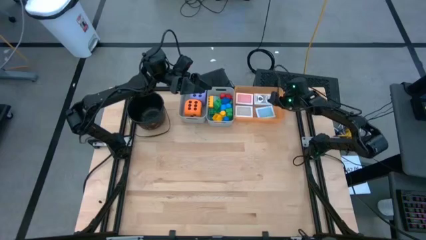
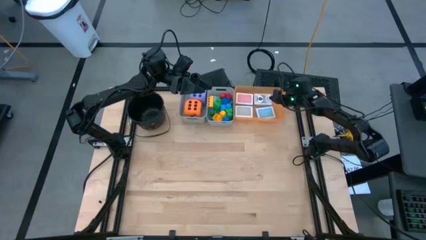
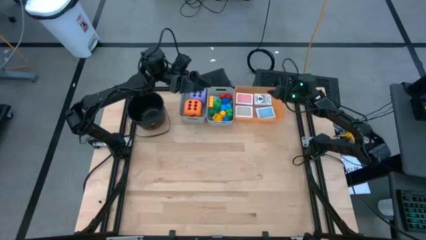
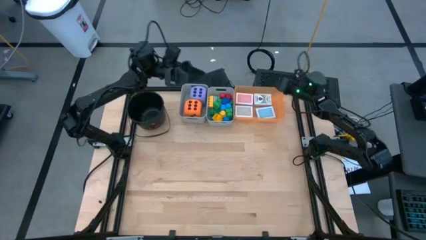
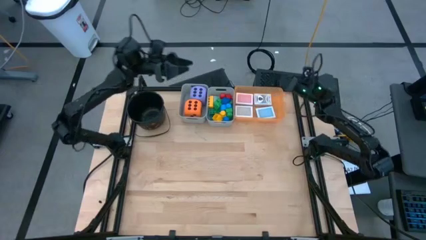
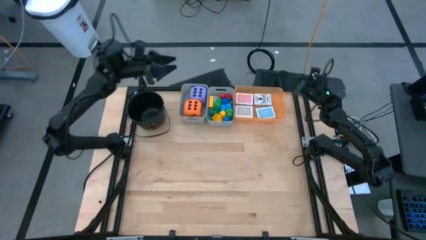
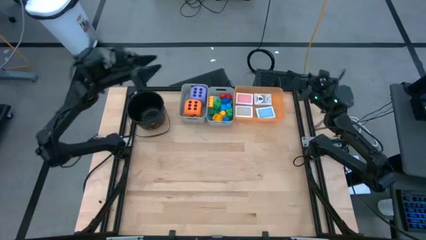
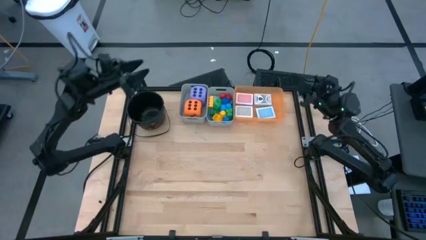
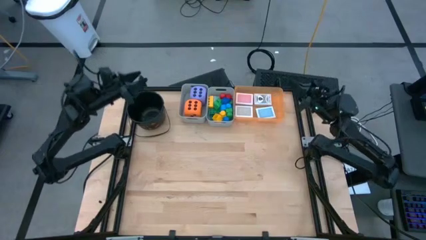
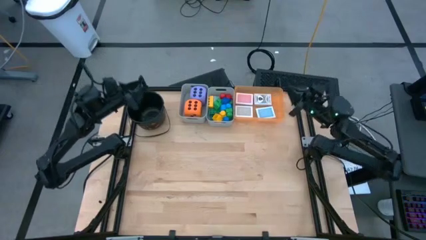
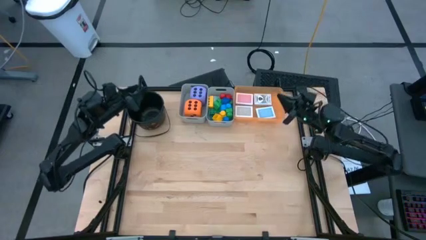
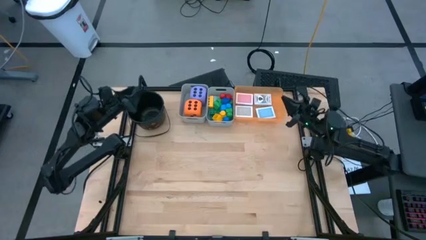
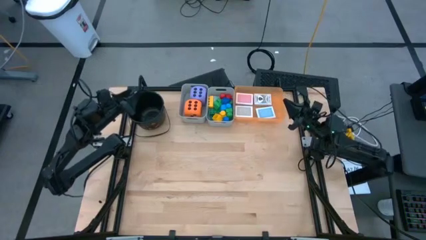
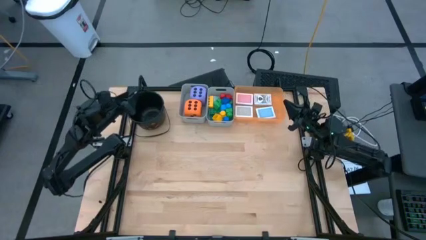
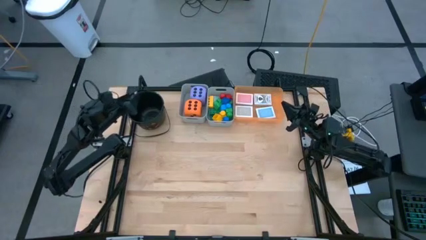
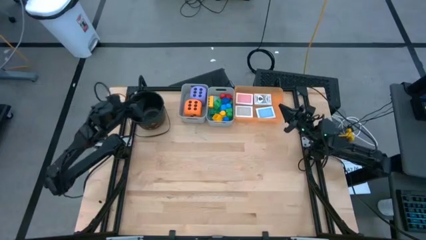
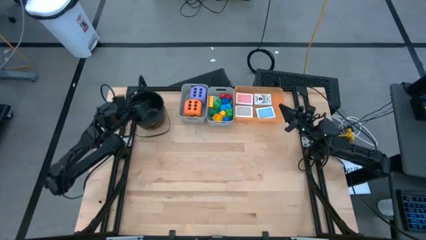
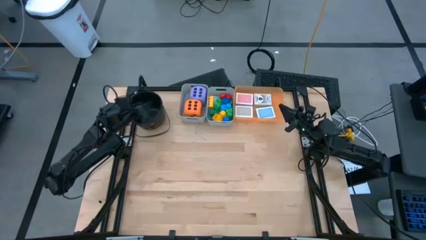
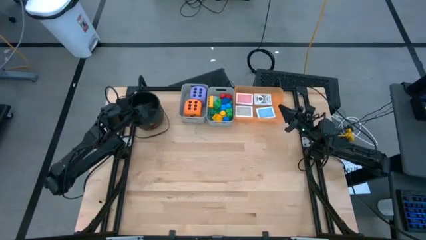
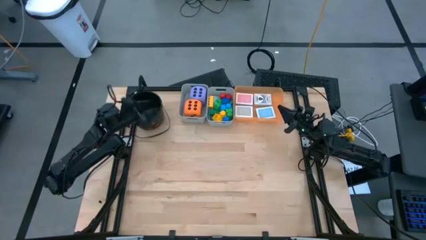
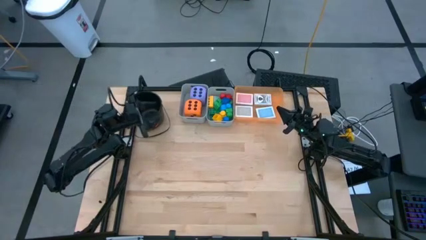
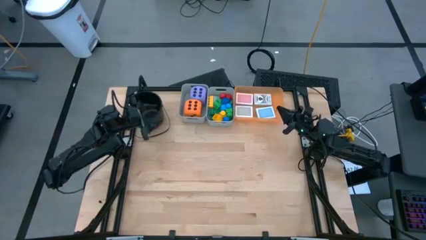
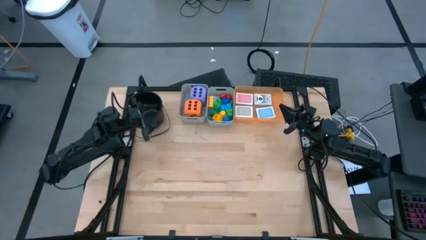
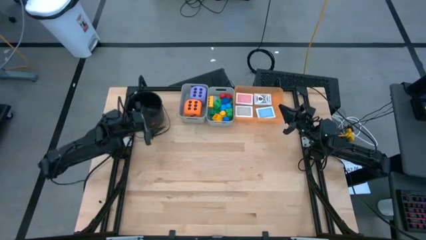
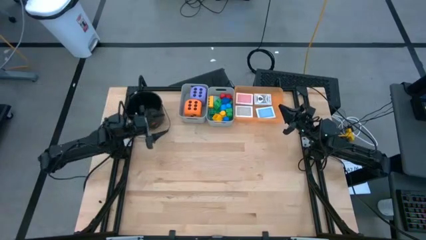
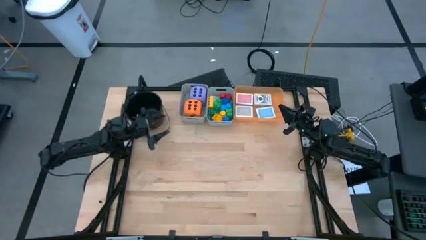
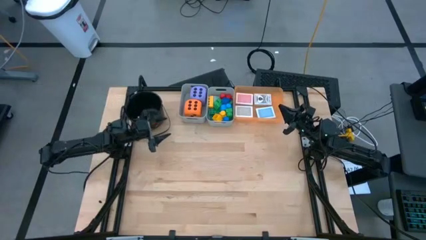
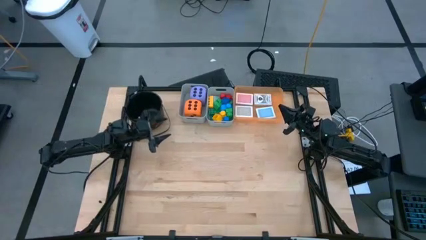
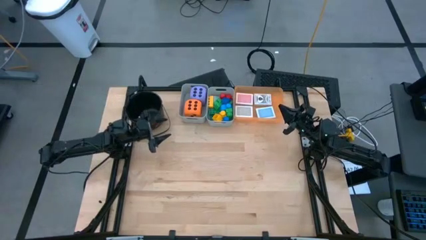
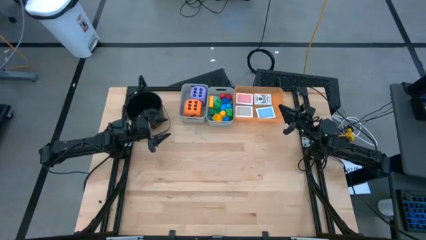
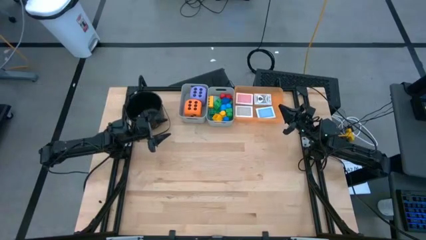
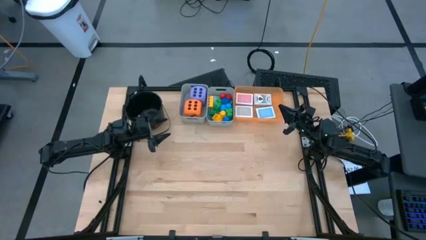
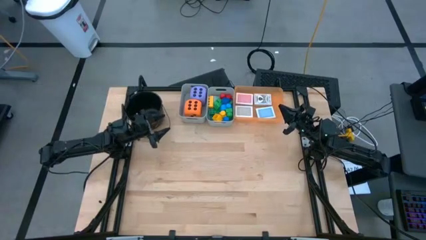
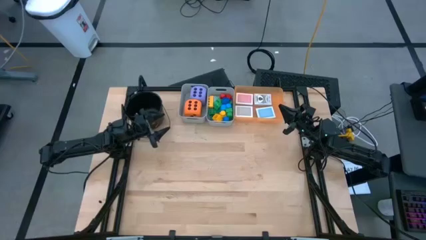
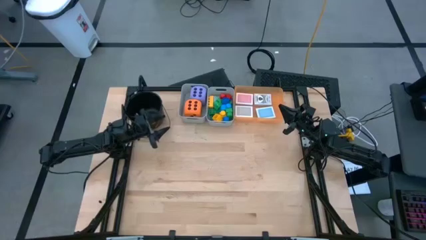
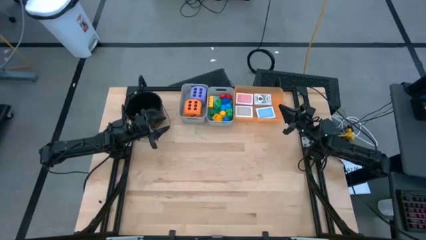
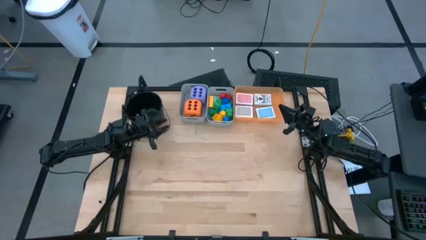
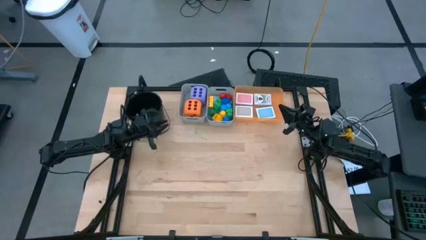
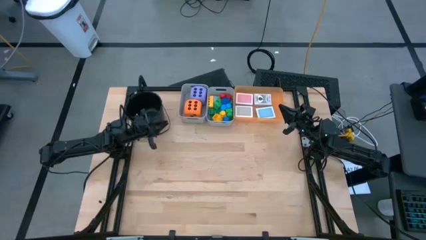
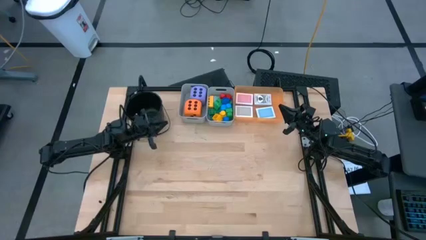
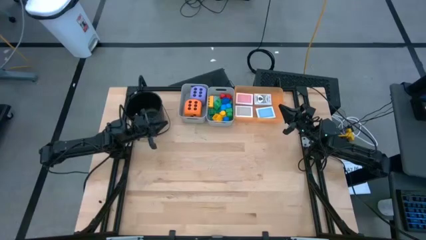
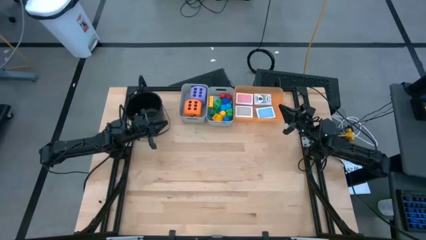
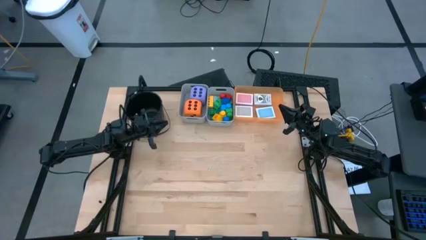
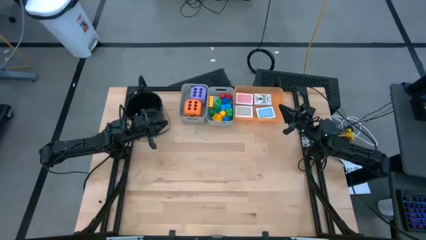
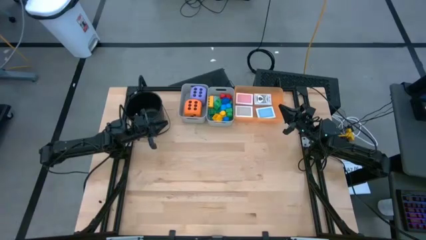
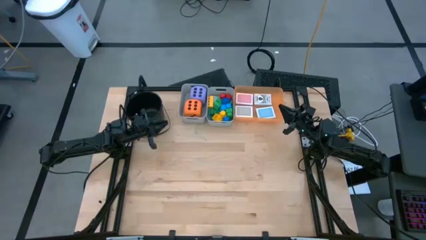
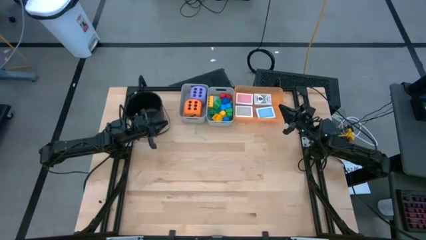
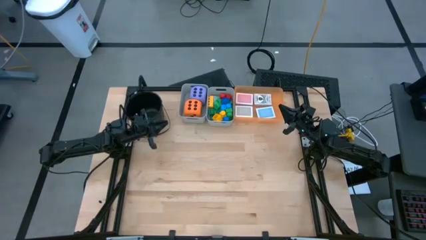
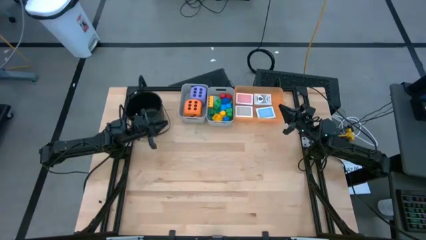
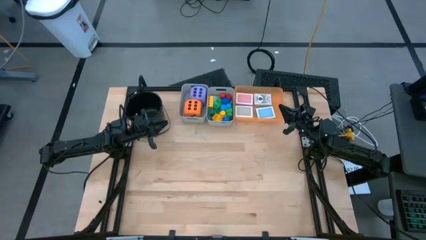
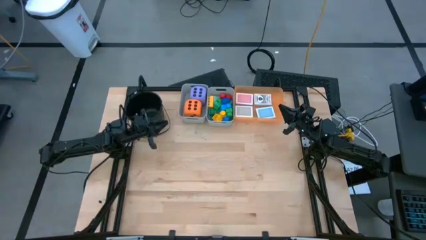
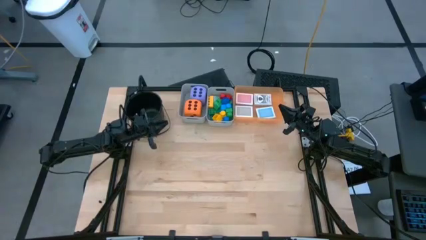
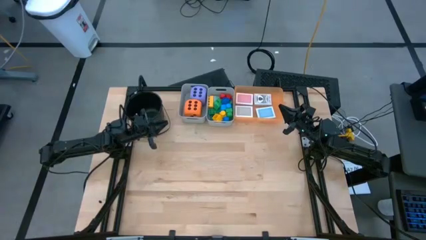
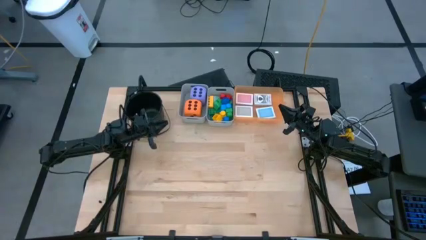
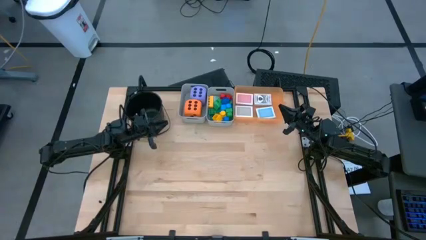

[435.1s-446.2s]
Task: Pick & Place Toys
Return to Home Position

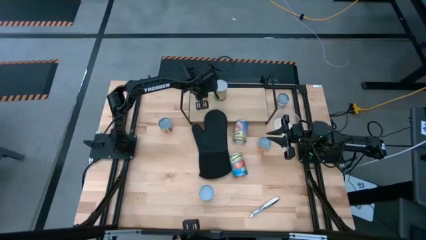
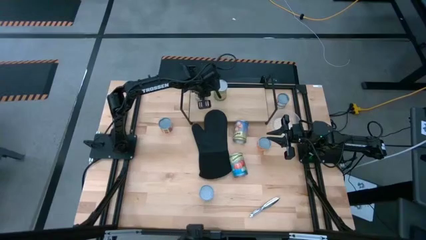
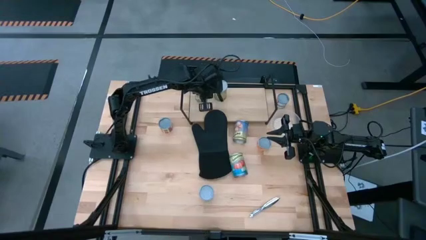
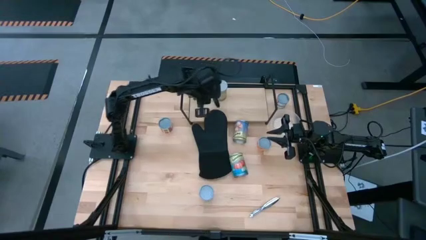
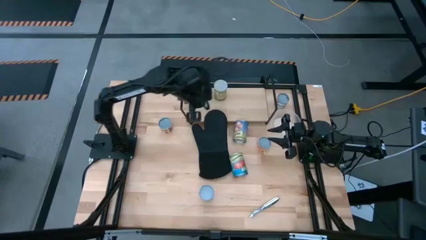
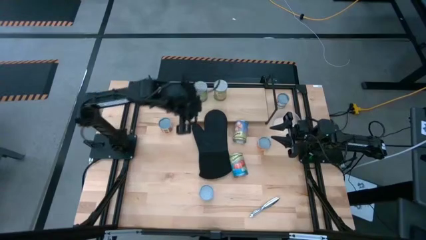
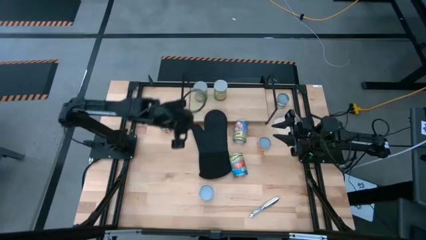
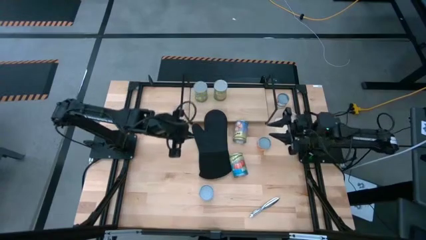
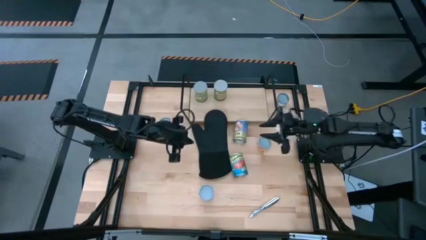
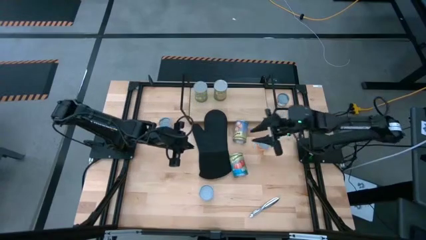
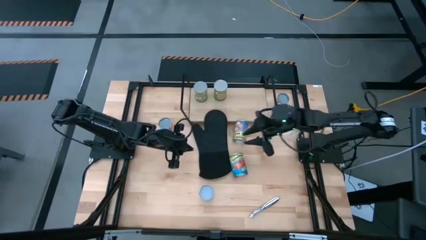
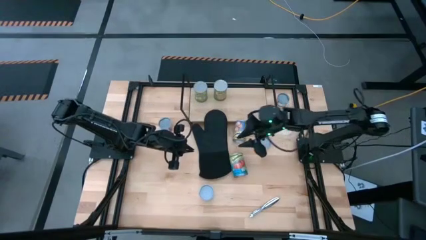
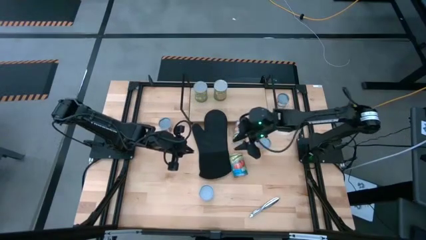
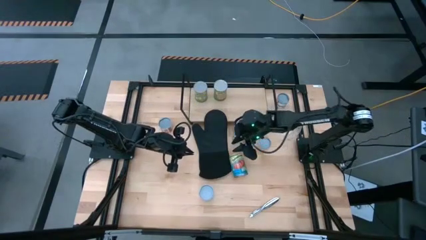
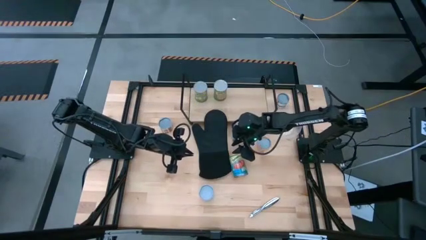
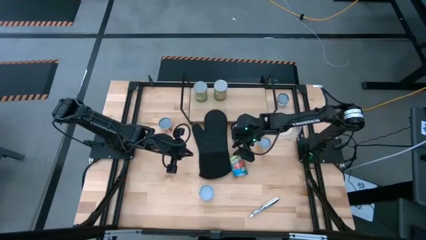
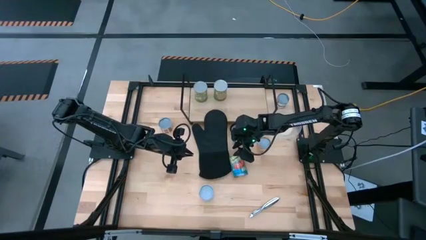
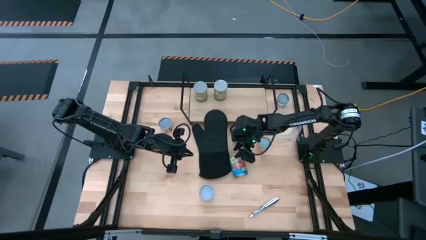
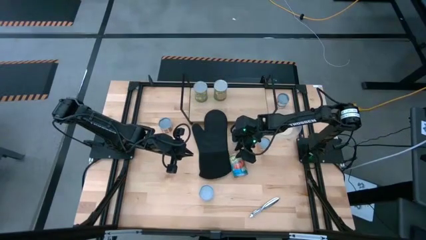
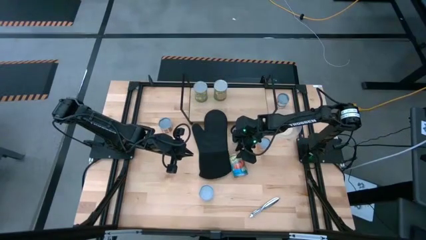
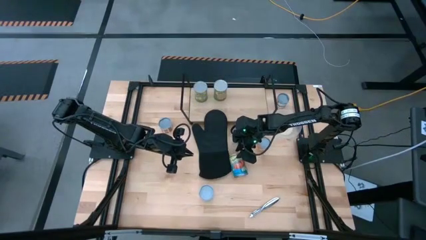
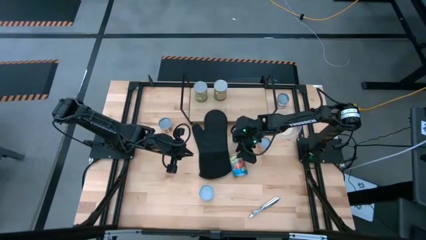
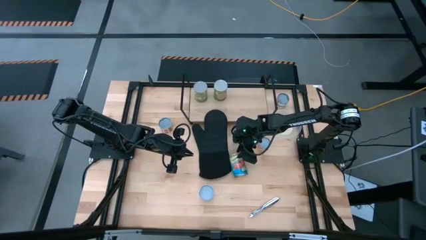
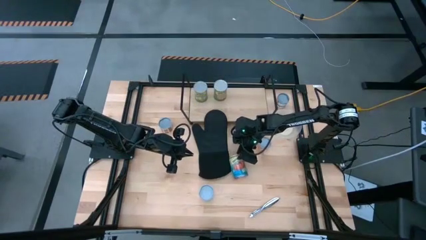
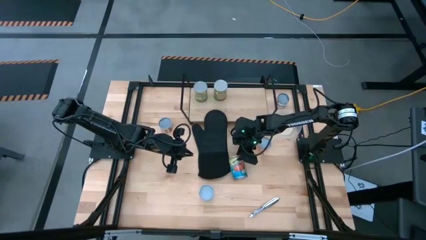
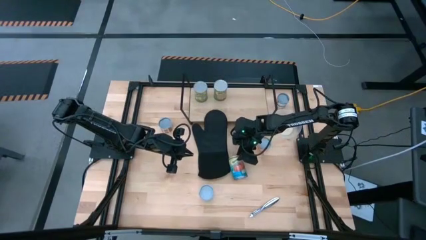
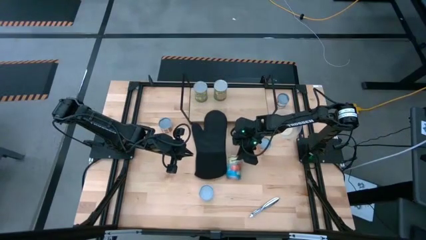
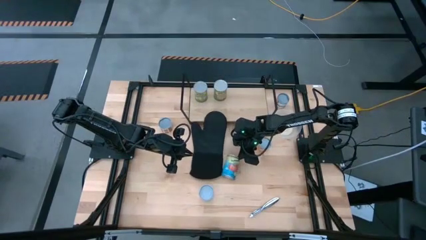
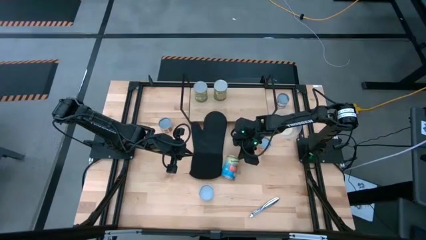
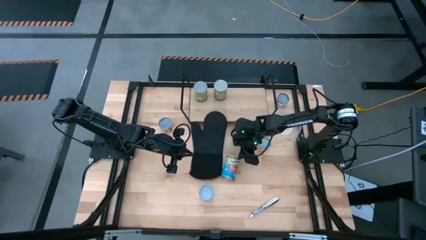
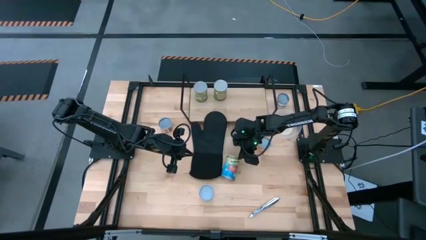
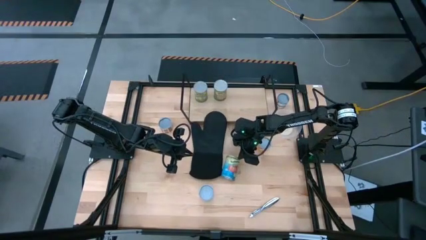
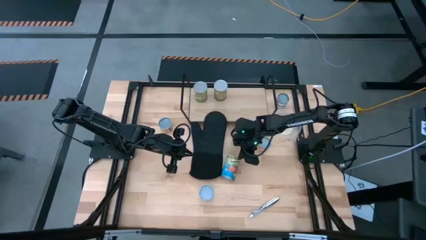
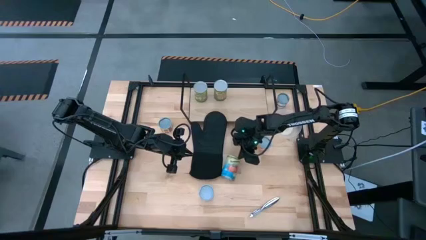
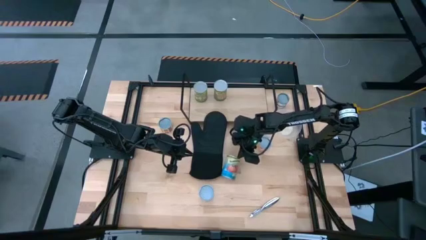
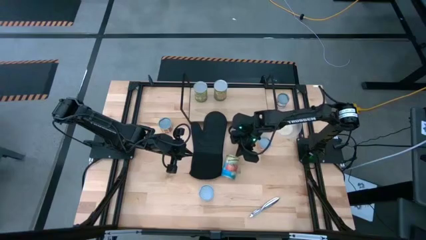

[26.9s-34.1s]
Task: Pick and place cans onto a shelf
Put the large canned tomatoes on the shelf
